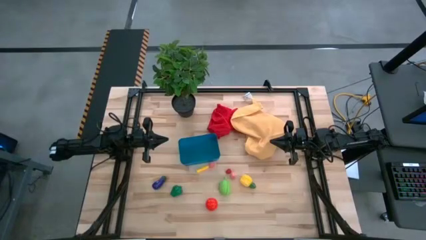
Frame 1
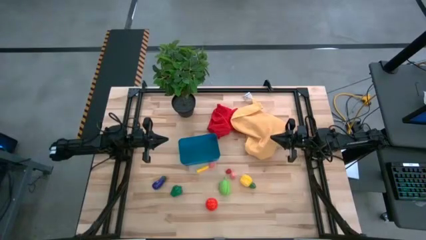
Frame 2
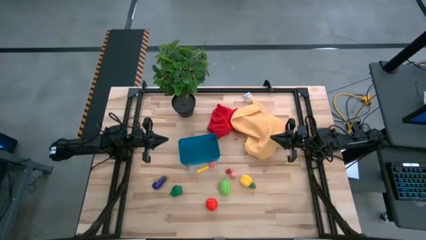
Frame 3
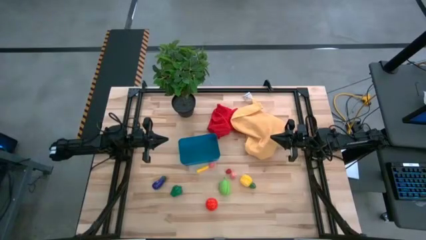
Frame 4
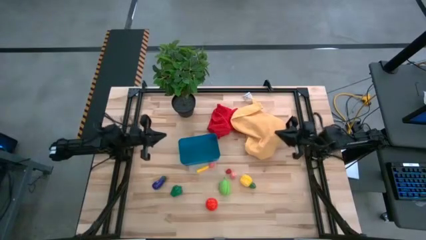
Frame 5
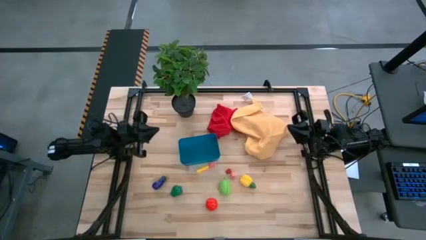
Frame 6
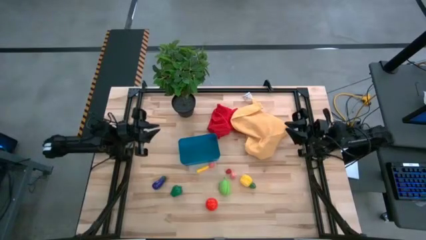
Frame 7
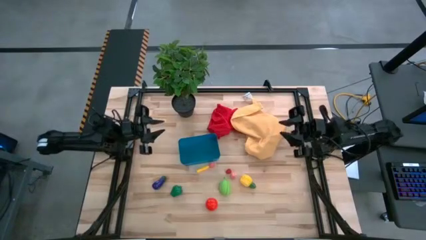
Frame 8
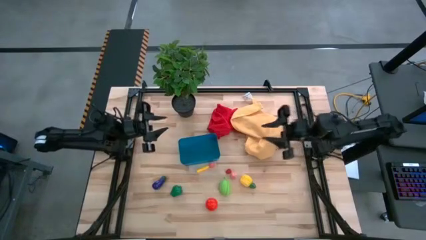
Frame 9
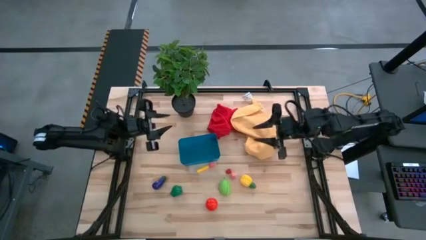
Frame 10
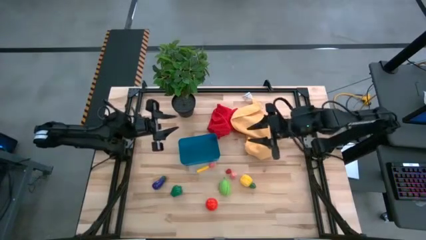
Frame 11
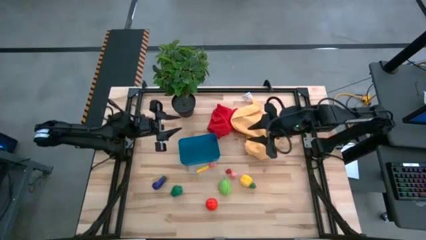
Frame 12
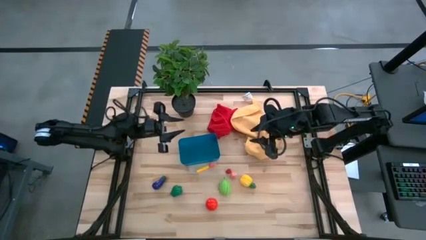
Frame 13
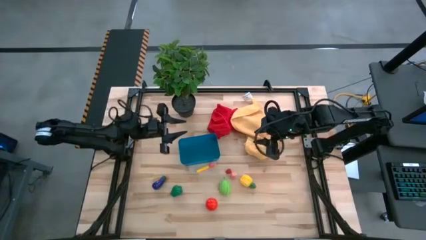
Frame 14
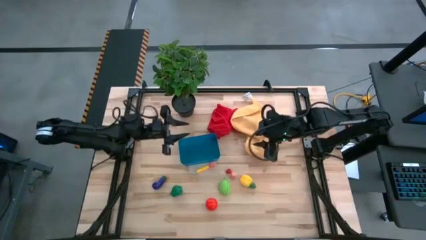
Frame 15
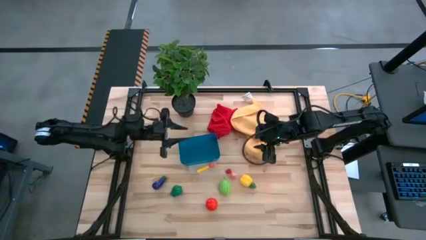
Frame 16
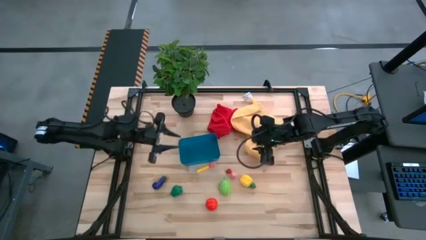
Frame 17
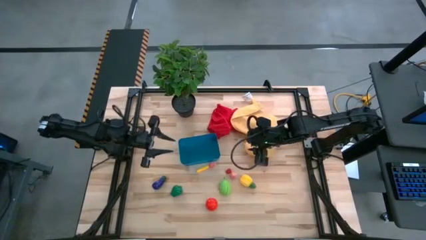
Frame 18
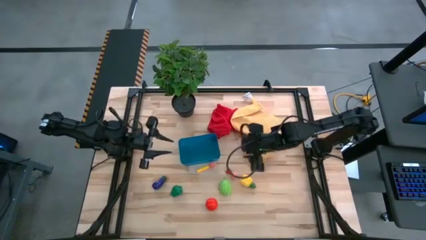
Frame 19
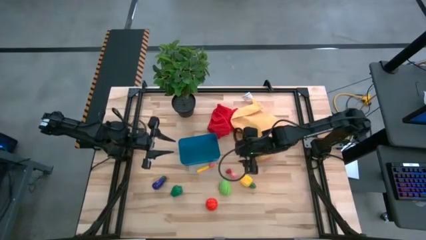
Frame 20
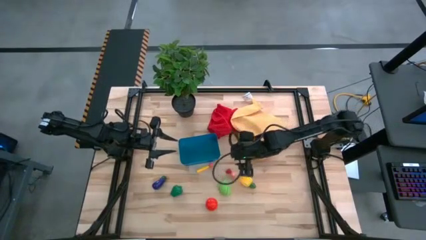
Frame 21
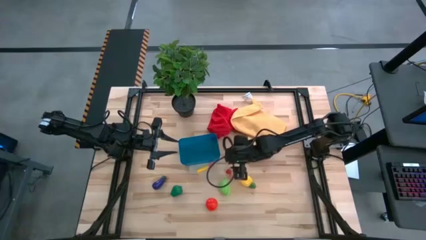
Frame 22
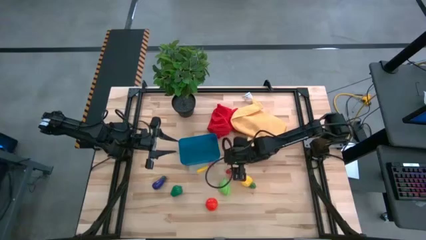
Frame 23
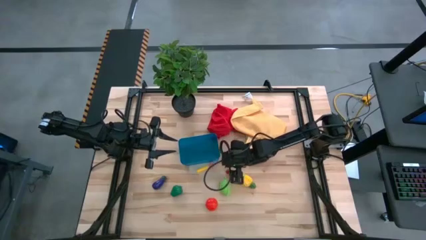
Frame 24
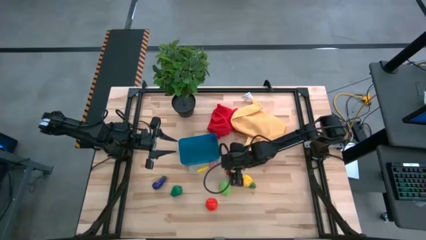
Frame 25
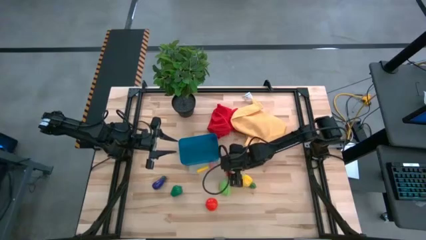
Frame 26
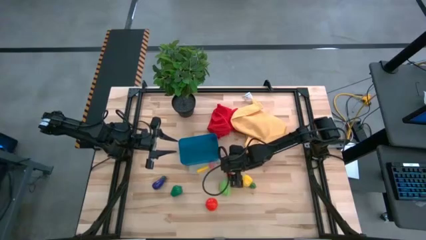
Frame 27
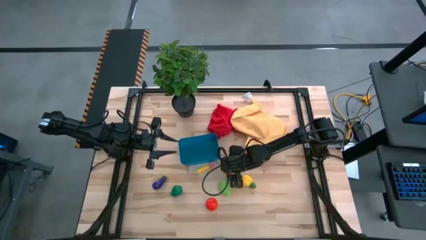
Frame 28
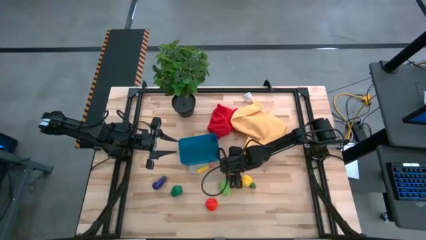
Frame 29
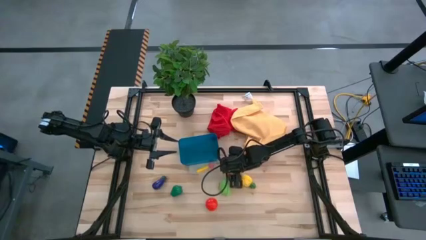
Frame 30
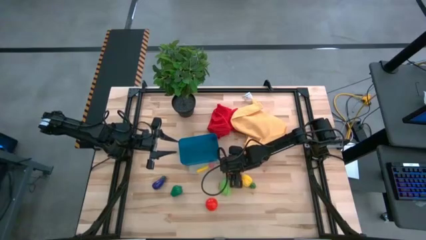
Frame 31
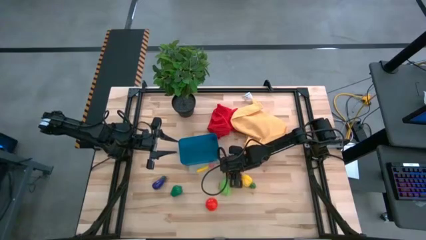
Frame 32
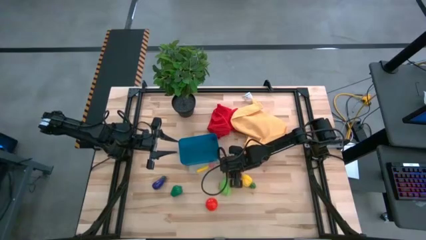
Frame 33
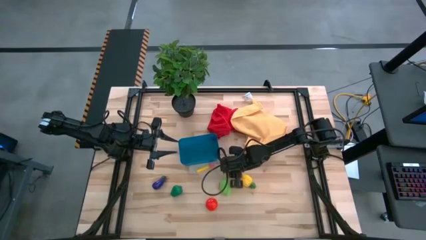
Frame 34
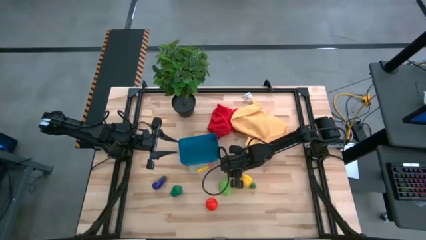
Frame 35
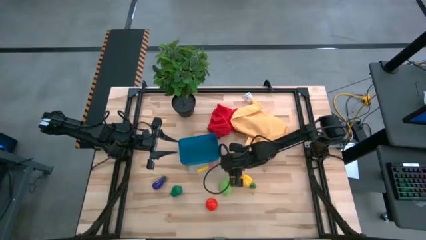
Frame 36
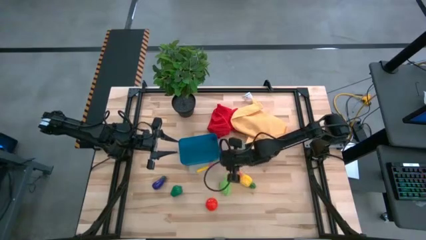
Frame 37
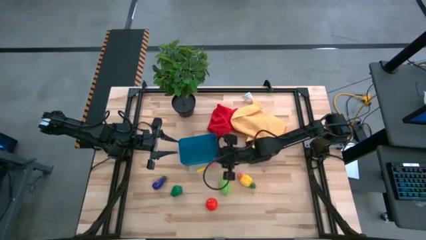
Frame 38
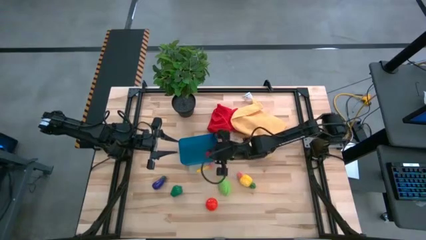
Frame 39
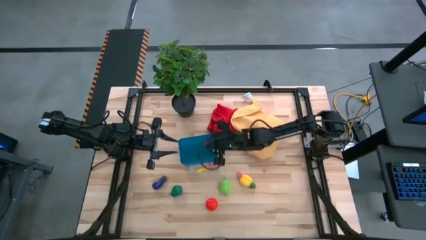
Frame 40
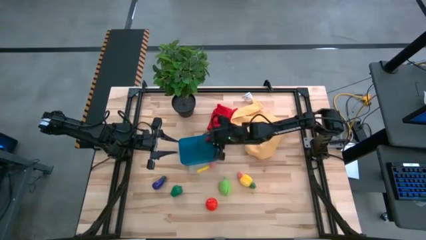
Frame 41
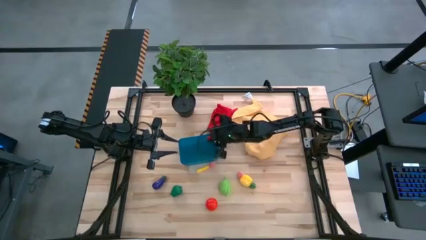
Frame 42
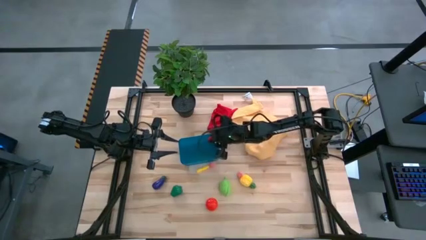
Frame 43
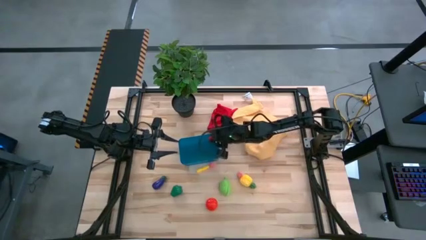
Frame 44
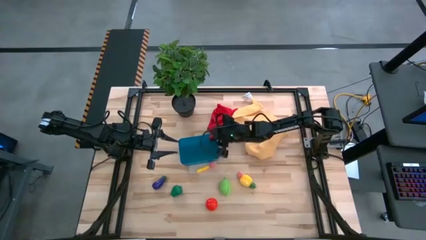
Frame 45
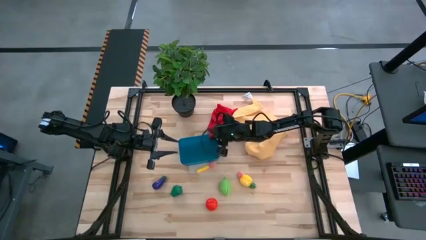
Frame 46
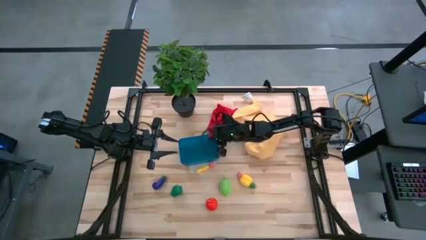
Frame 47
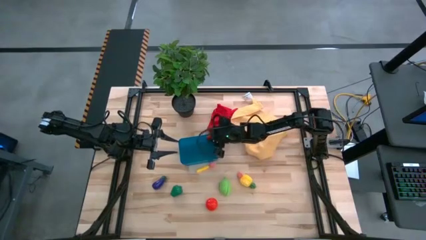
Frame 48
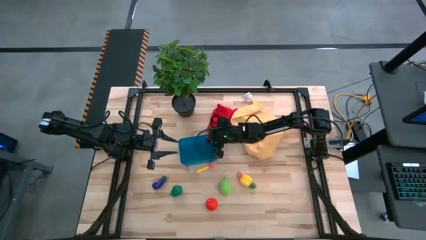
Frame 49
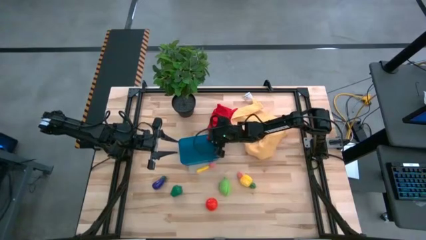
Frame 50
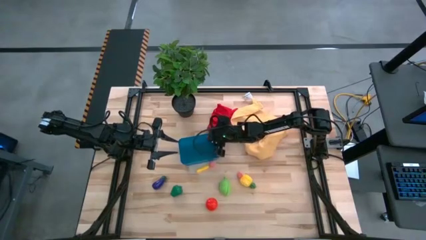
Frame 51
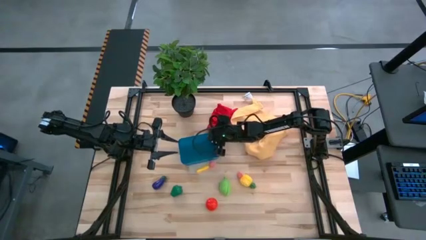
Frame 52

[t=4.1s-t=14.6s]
Task: Pick and placing Produce into tupperware
Put the red raspberry into the blue bin

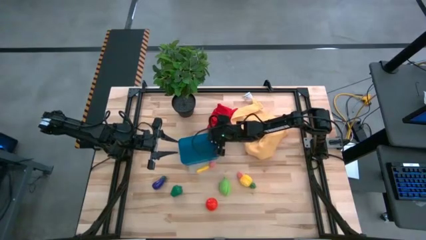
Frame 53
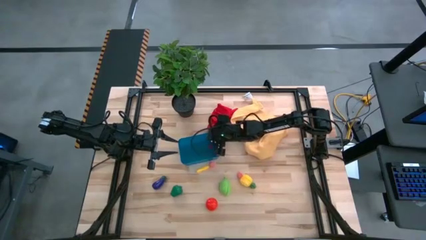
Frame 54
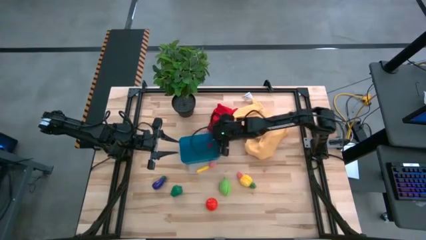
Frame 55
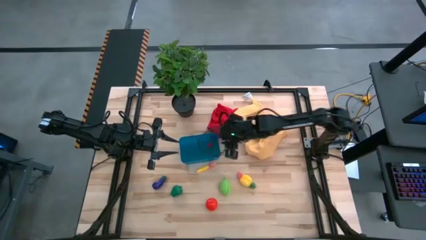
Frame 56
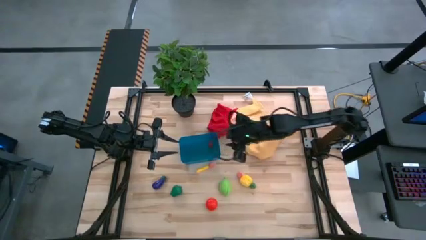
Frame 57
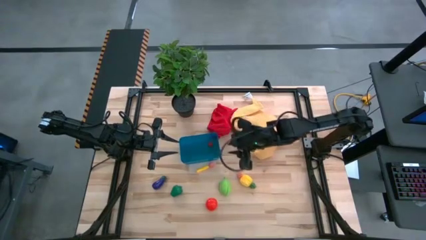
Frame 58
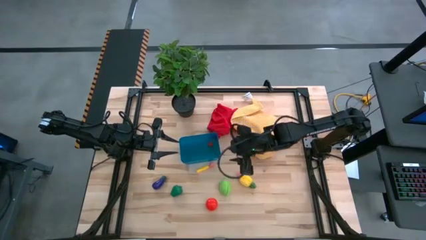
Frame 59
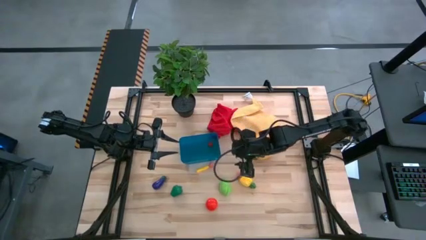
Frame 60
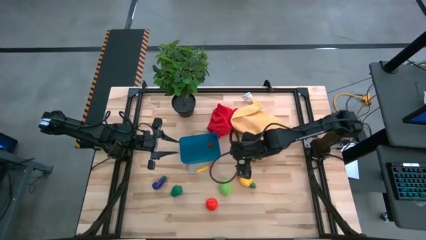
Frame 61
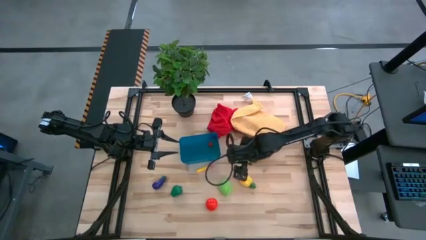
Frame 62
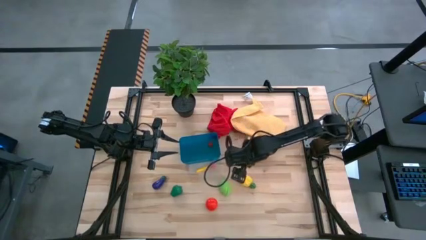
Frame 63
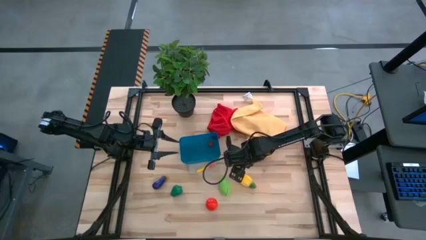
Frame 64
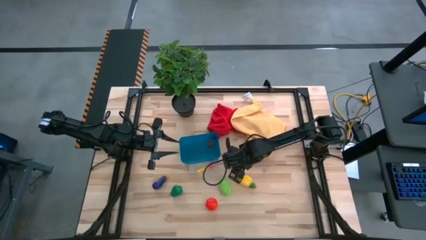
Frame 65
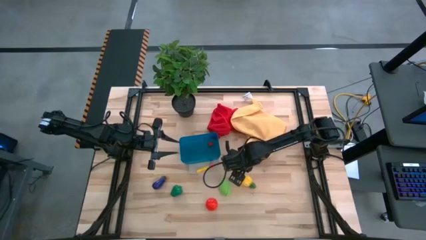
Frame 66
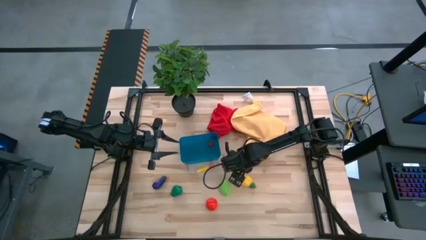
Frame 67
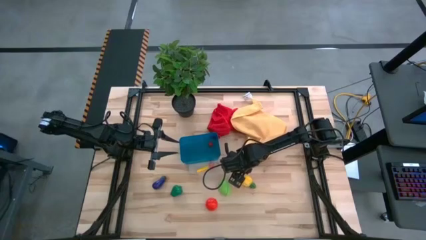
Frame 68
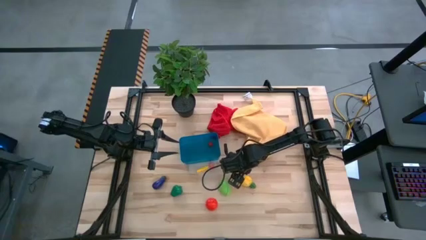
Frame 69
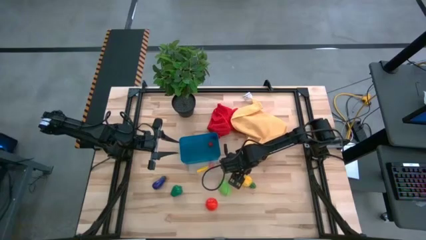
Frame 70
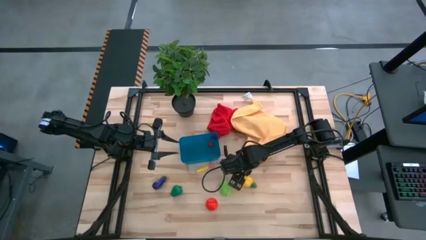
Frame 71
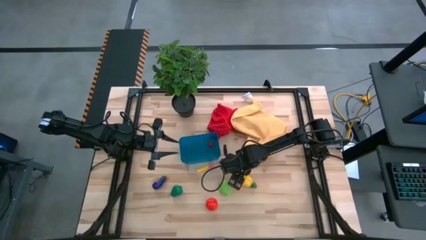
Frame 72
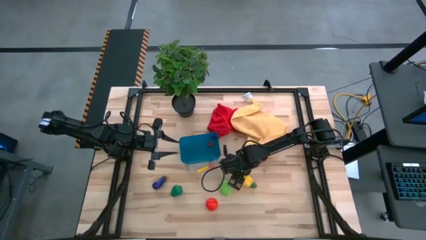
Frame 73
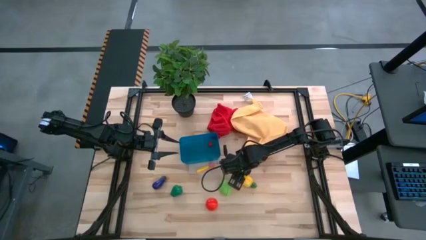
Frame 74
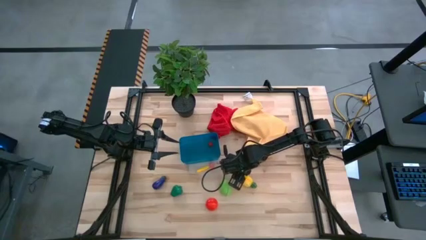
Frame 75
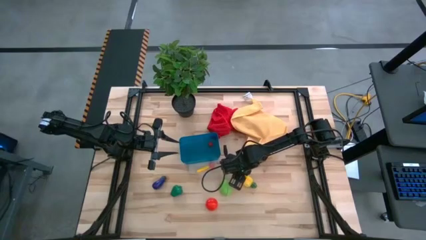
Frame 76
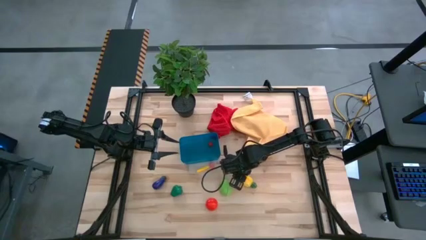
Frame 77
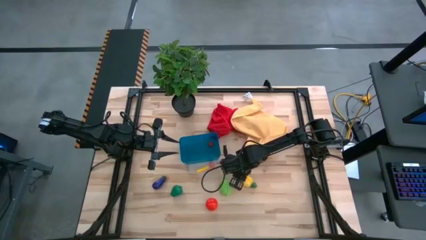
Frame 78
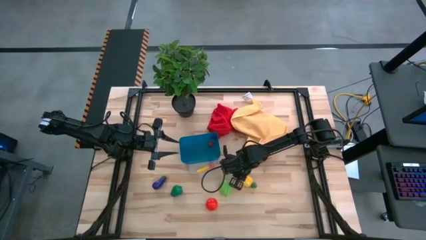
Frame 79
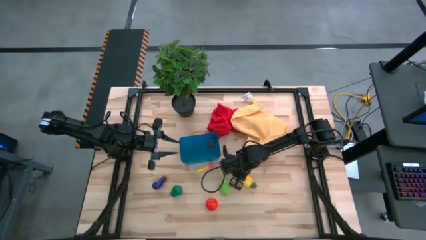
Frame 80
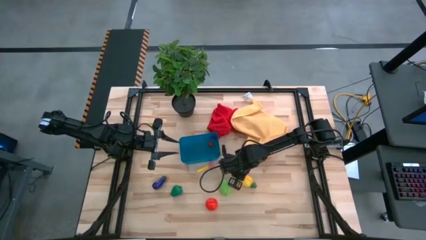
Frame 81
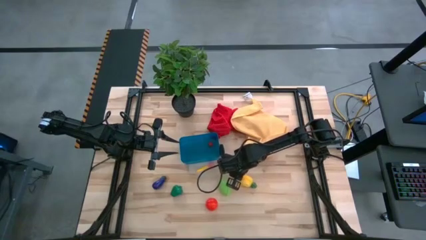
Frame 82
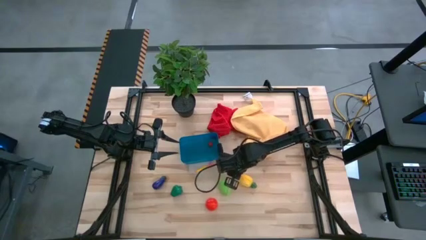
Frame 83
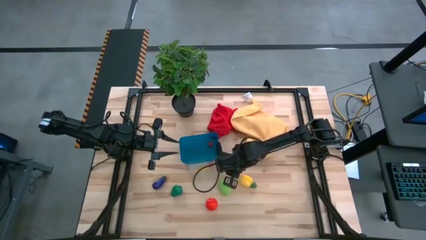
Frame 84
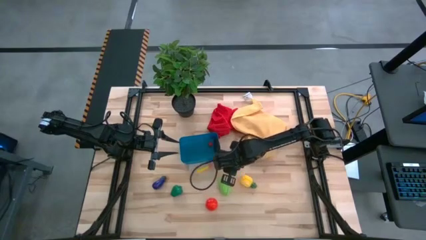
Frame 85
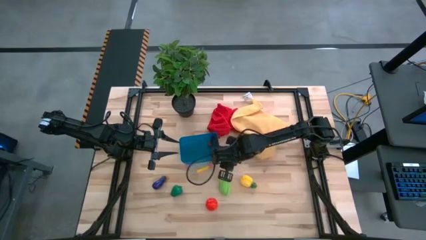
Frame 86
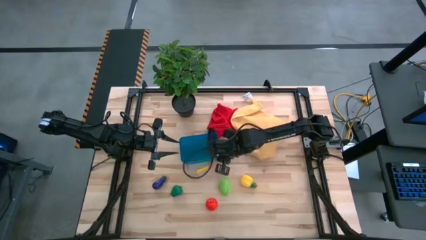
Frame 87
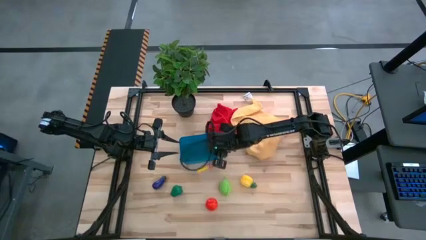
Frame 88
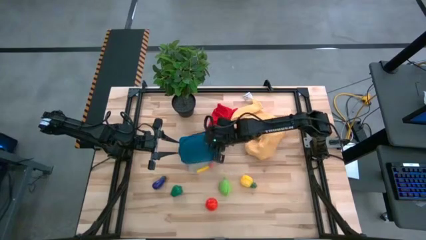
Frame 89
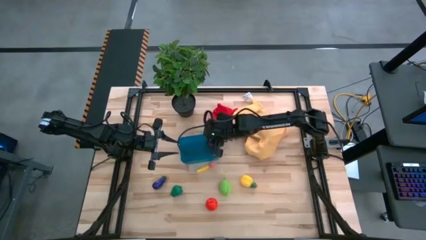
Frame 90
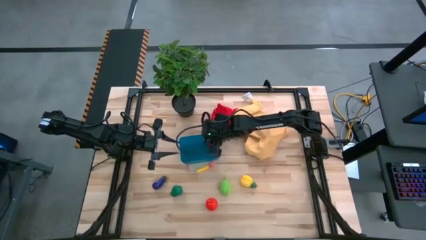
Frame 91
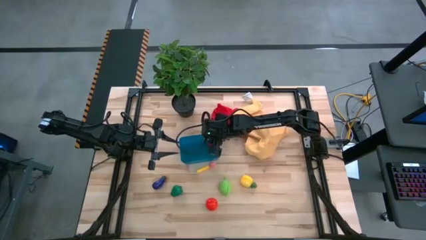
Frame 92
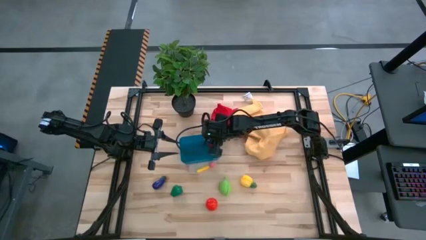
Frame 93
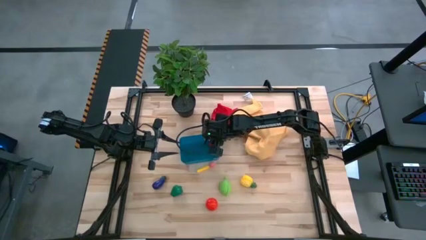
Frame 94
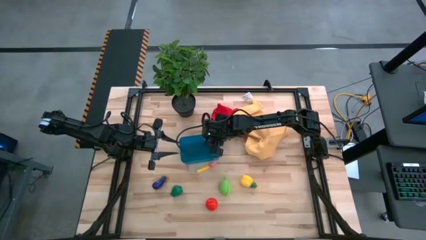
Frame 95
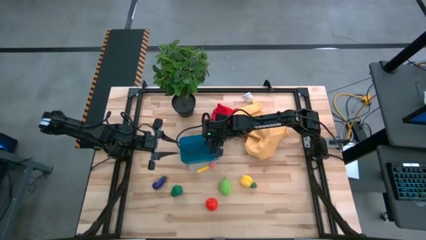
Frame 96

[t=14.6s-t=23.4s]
Put the bottom pink peach into the blue bin
